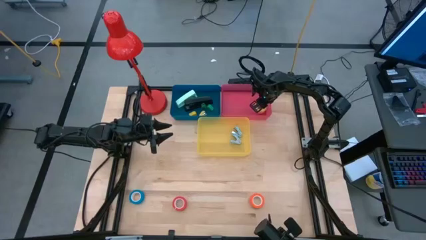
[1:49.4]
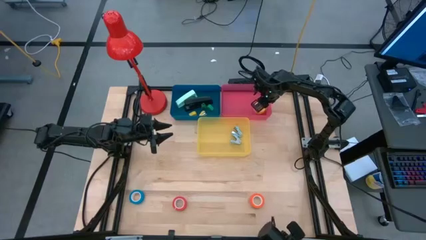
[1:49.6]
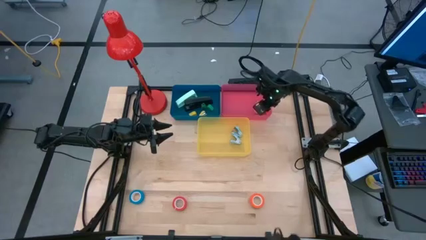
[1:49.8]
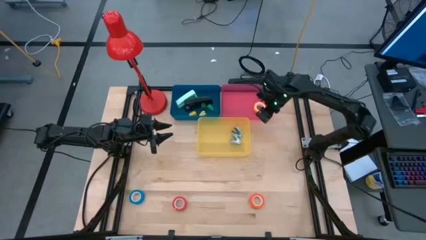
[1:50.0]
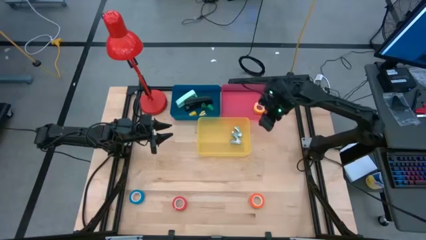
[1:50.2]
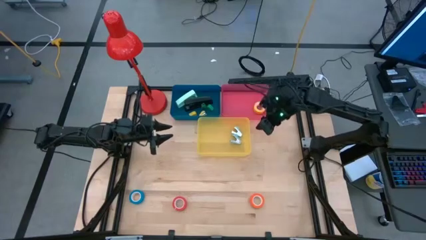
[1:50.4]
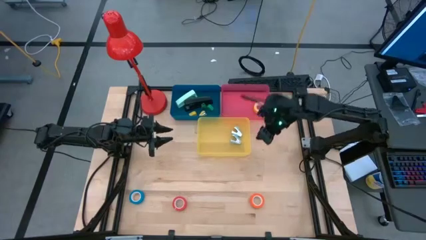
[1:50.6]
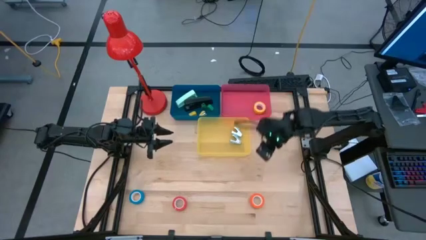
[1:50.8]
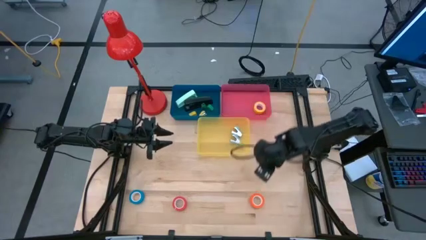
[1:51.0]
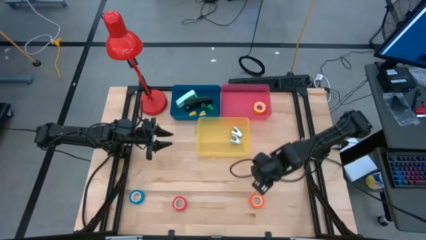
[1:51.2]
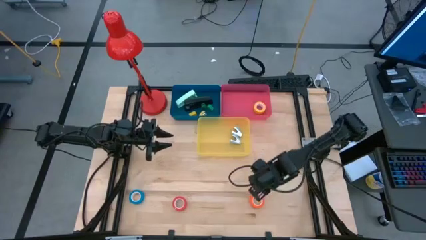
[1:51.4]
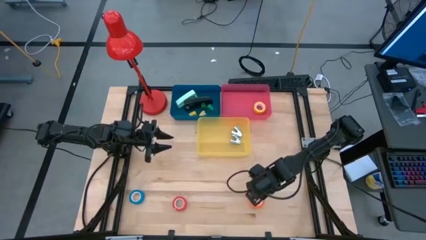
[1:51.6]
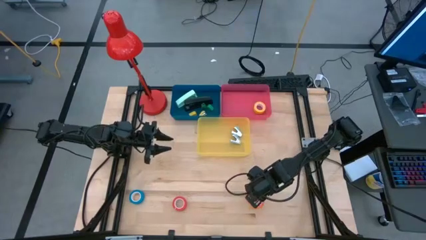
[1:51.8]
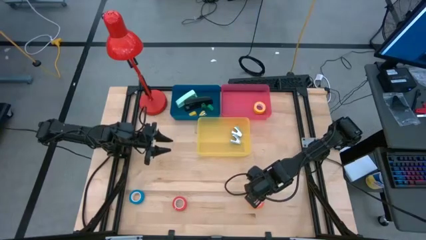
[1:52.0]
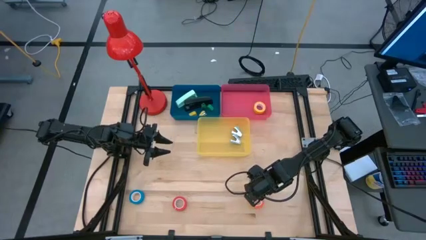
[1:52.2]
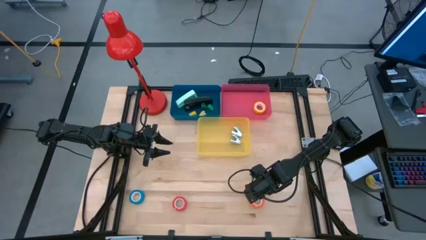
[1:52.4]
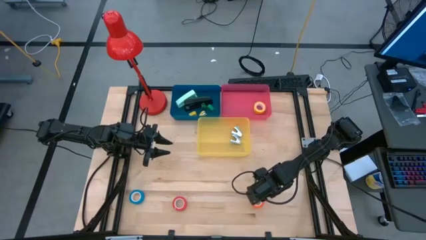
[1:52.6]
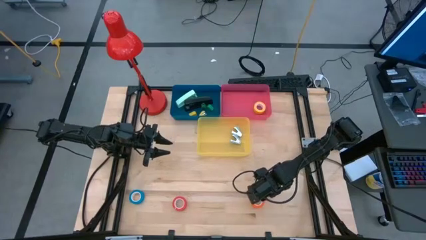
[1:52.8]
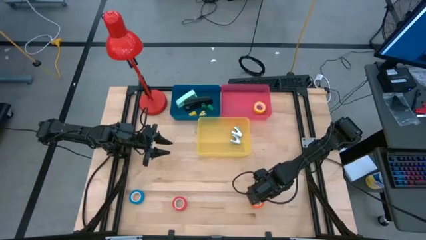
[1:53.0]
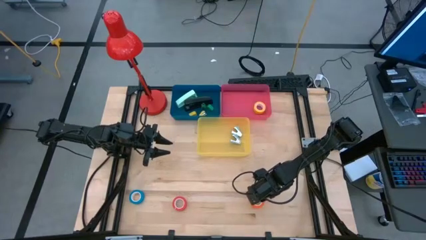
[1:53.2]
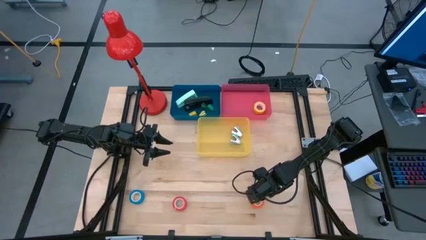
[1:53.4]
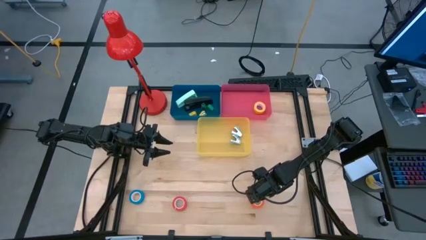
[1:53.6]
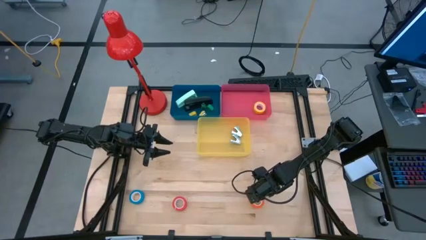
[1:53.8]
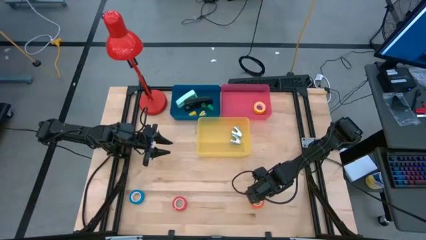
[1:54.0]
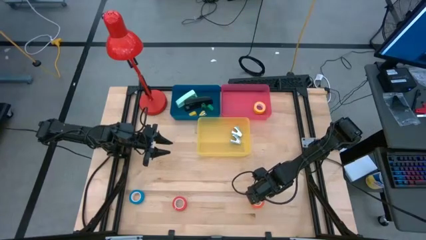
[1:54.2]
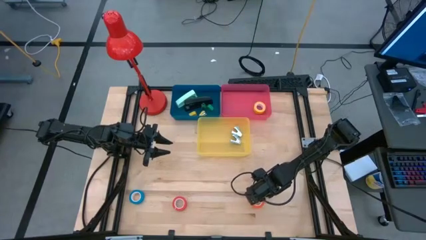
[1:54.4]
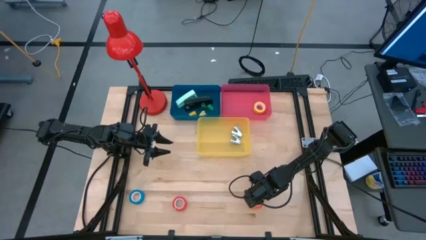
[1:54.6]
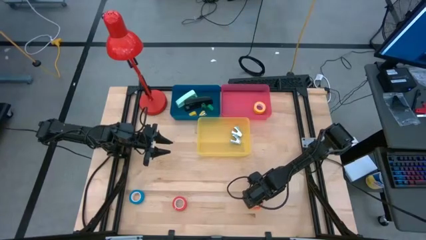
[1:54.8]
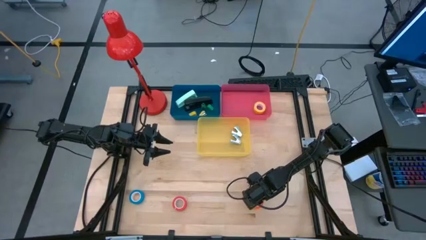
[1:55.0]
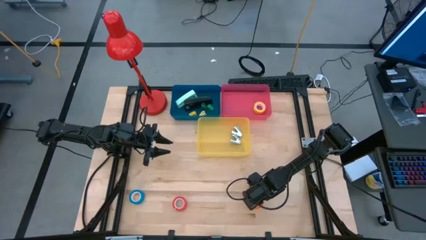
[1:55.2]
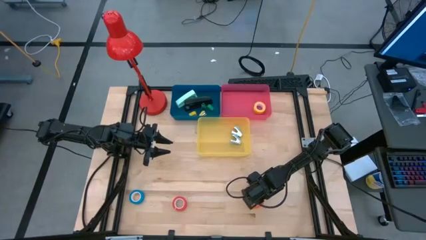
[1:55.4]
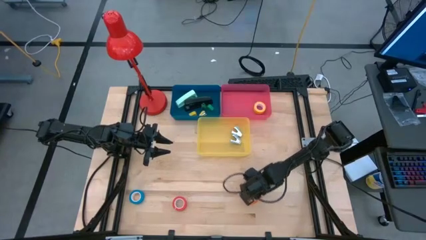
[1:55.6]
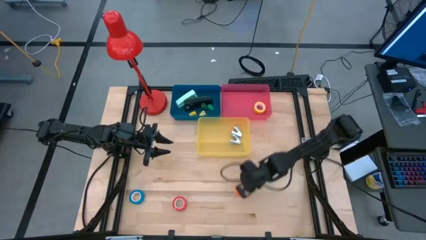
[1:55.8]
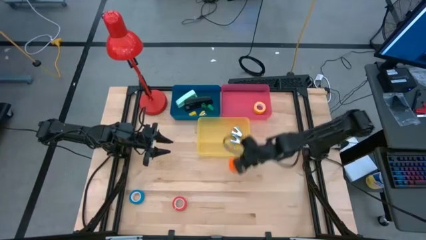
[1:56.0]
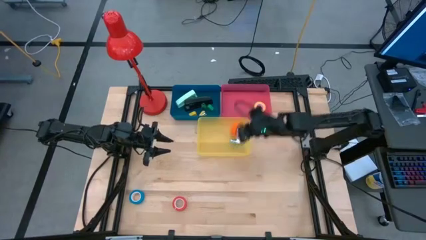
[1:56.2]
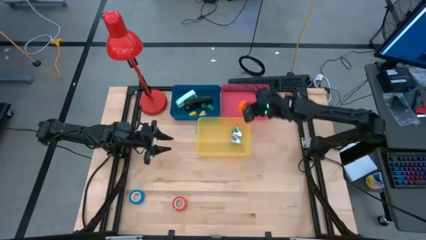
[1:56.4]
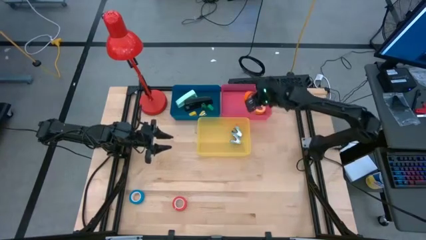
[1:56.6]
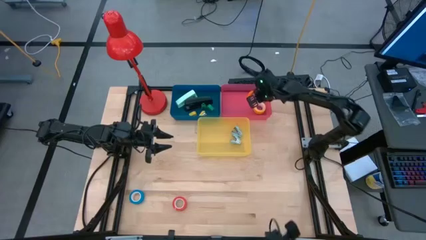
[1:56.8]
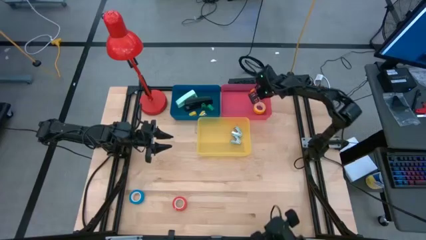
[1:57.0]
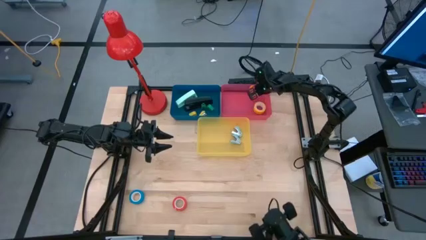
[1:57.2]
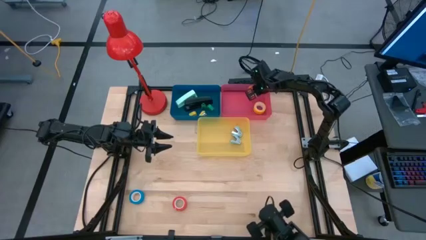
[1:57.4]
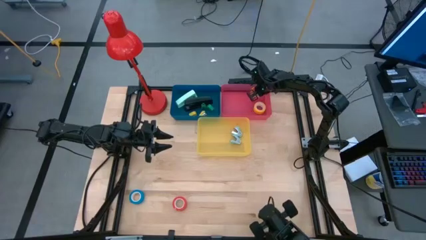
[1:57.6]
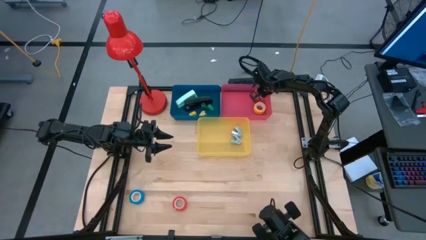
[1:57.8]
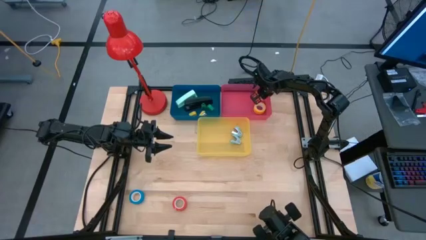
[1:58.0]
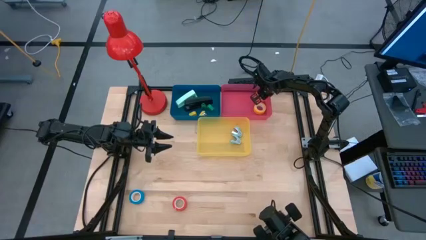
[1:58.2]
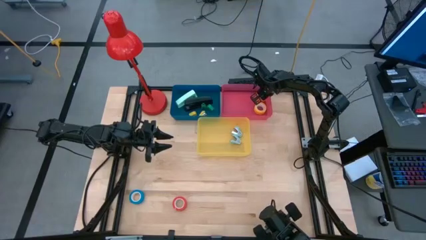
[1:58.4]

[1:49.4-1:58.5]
Task: Pick and place Stapler, Stapler remover, tape
Put the orange tape into the red bin

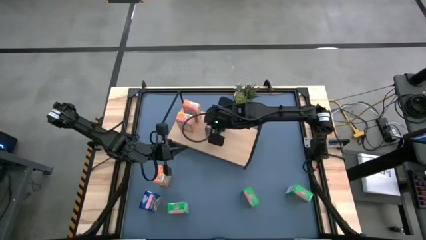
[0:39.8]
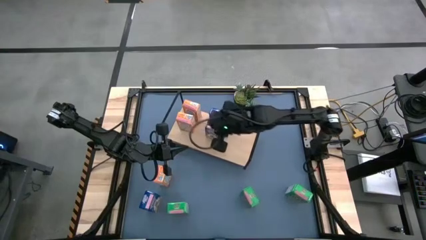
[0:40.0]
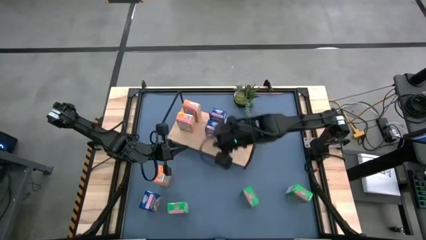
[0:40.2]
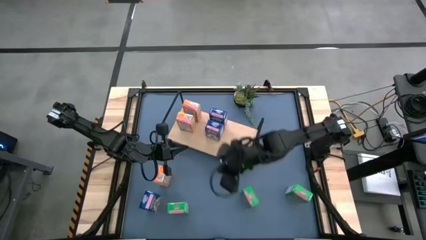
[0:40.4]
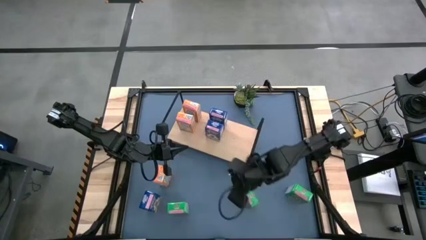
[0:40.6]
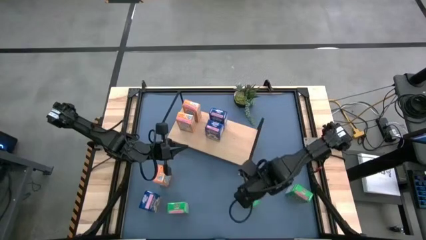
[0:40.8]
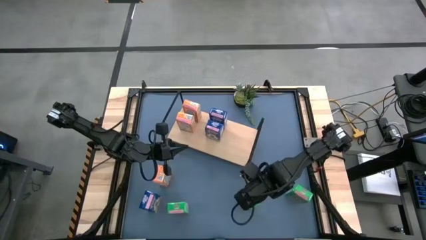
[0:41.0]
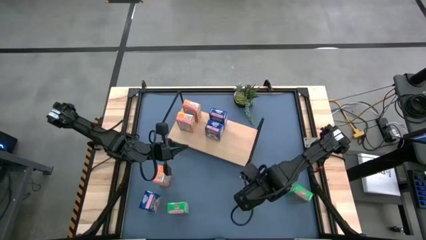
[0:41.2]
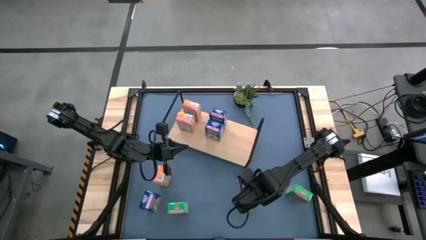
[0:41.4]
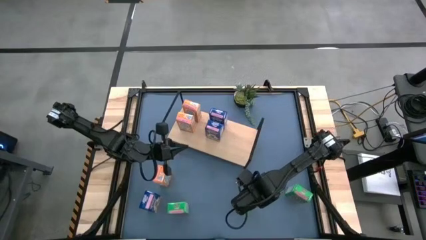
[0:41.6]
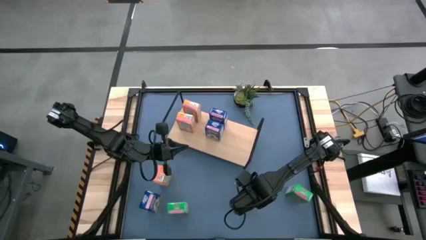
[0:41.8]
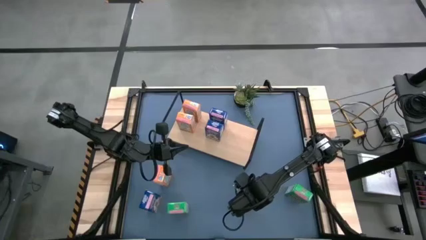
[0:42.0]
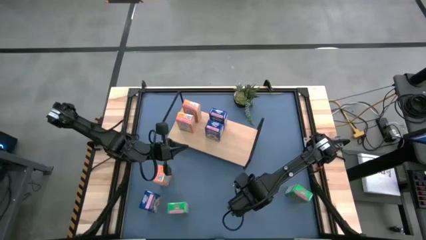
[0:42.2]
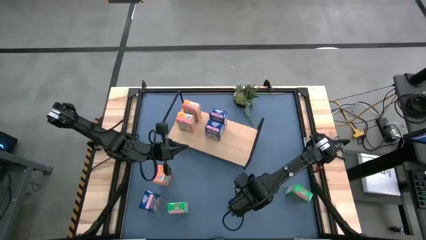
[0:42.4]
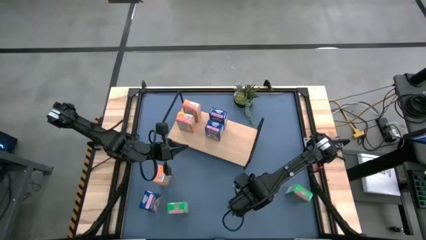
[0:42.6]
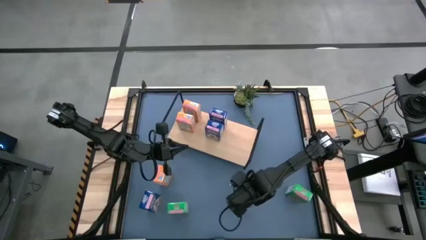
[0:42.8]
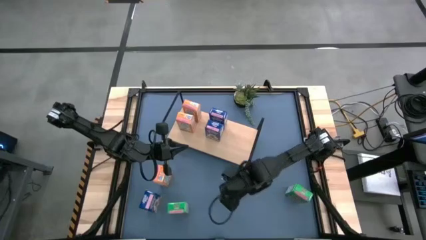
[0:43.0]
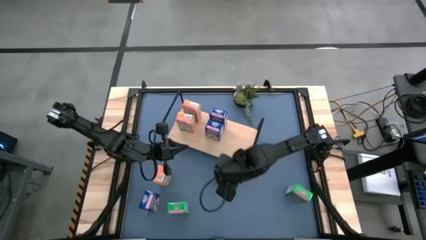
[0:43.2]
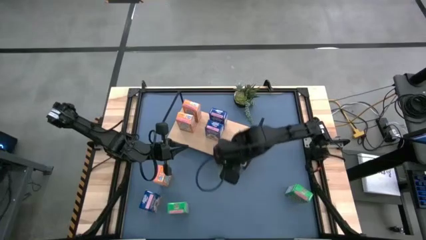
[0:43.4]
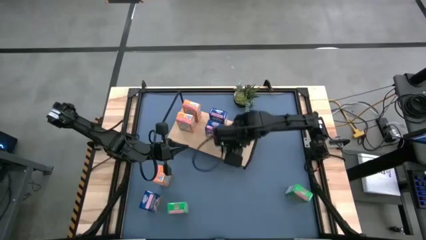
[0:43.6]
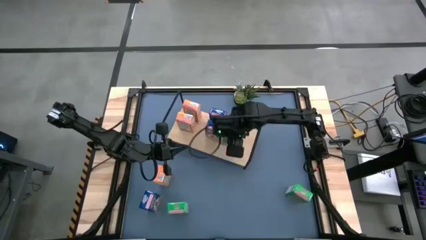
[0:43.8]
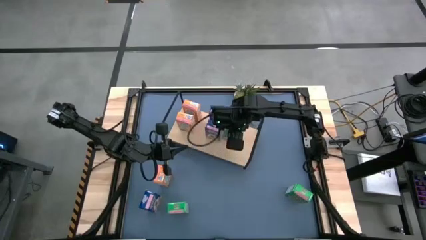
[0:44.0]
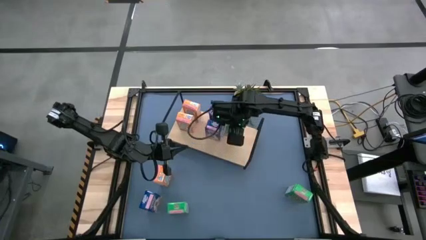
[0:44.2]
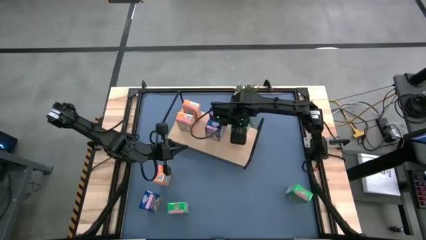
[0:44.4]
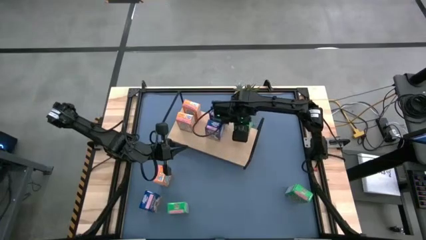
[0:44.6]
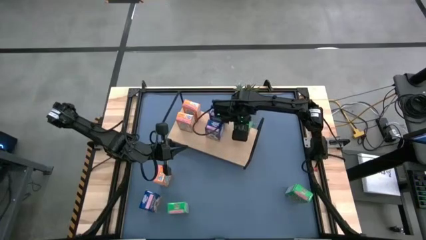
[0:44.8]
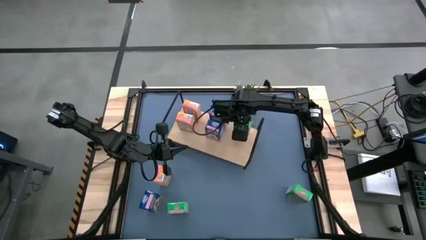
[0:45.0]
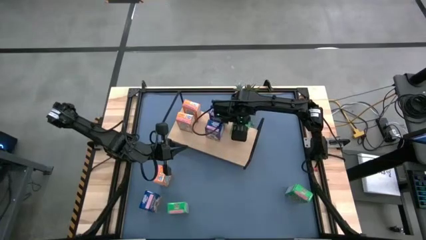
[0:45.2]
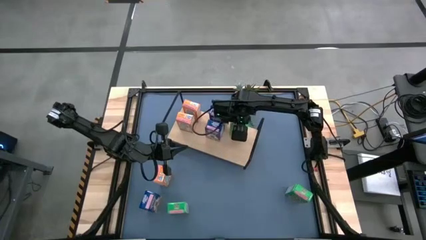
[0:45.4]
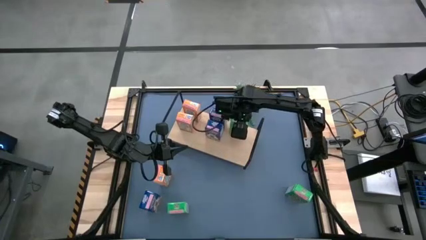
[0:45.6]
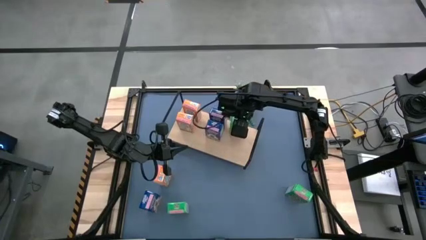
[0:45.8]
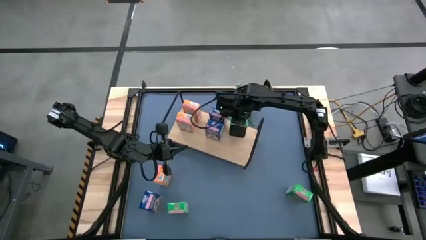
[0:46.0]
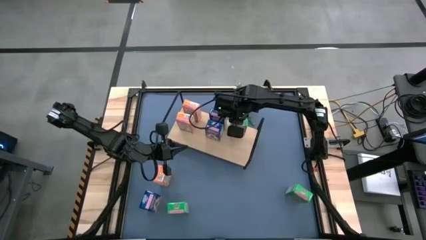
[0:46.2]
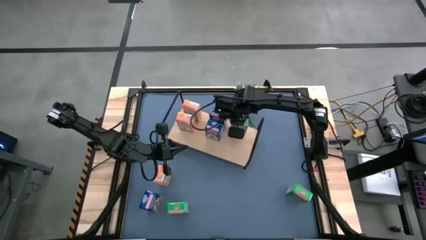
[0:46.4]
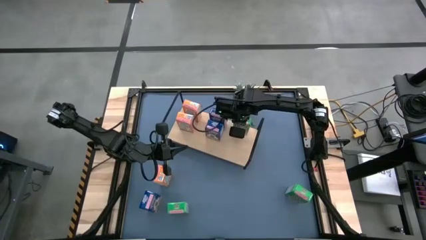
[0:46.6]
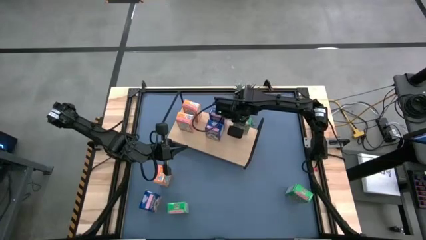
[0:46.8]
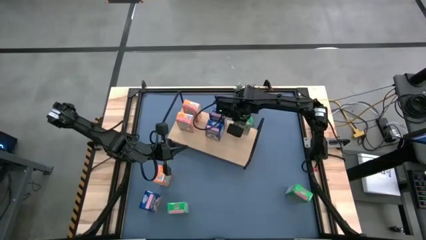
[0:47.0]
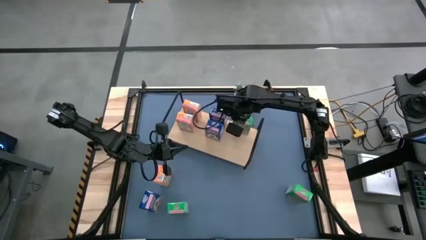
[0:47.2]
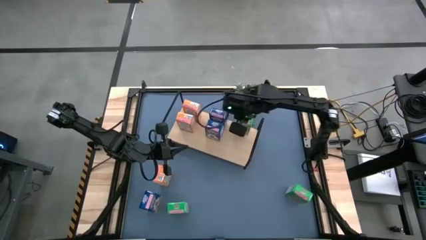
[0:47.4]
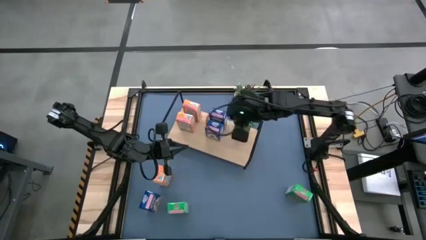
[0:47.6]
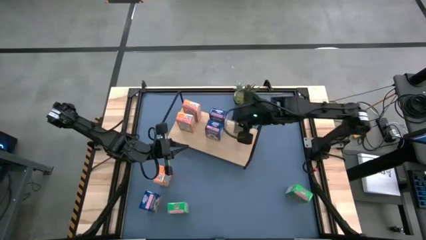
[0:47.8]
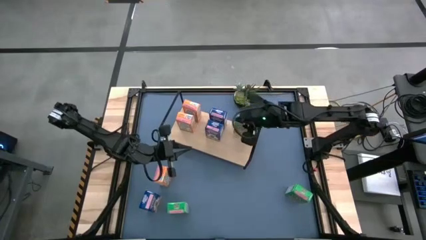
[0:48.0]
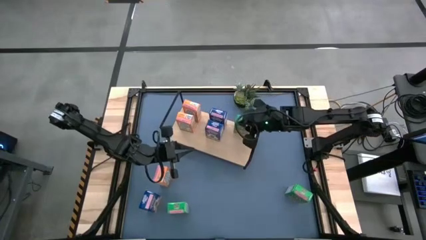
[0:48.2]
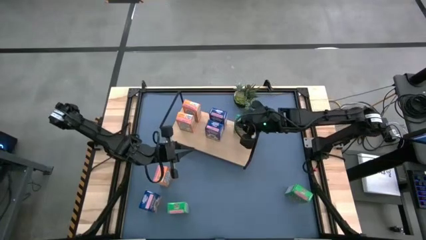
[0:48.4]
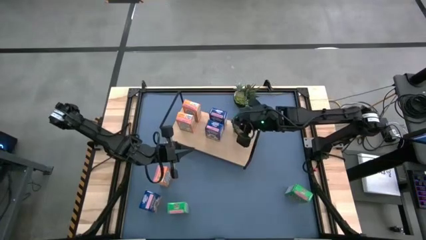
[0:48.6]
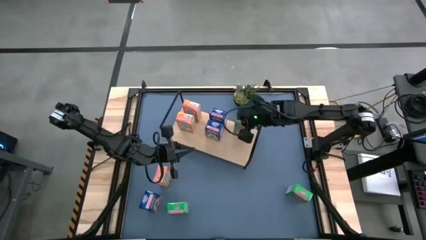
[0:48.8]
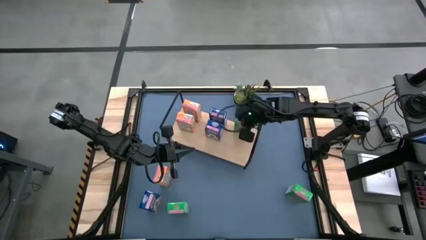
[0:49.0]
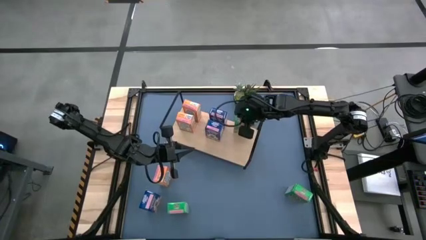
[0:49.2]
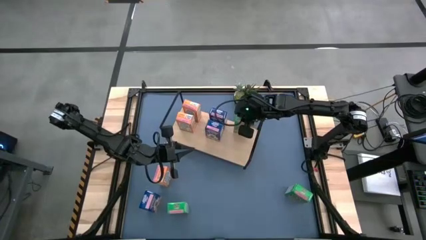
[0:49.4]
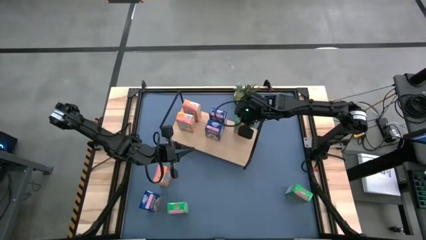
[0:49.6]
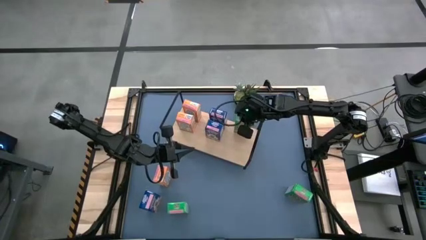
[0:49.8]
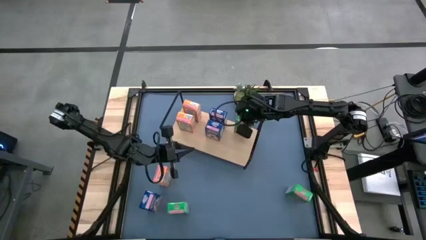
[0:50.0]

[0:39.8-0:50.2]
Task: Stack cereal on shelf
Put the middle green cereal box on the shelf
